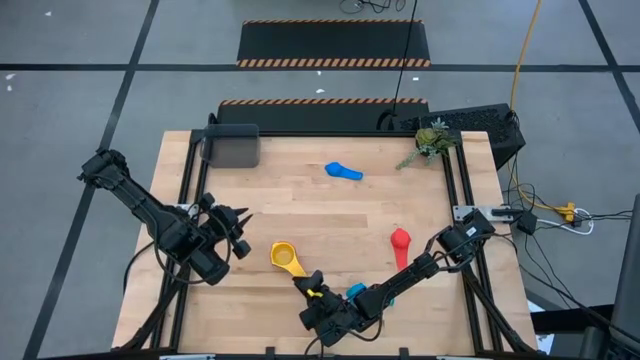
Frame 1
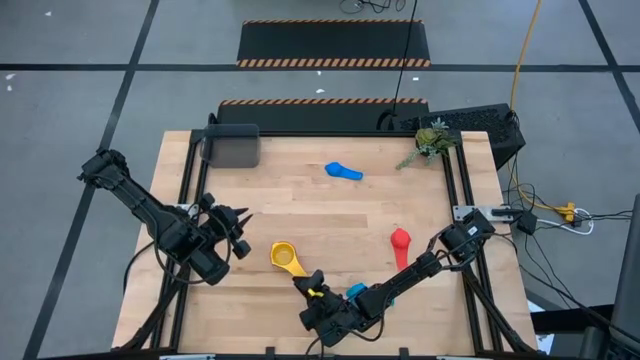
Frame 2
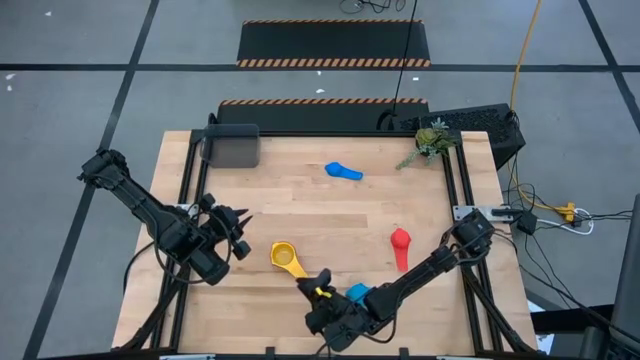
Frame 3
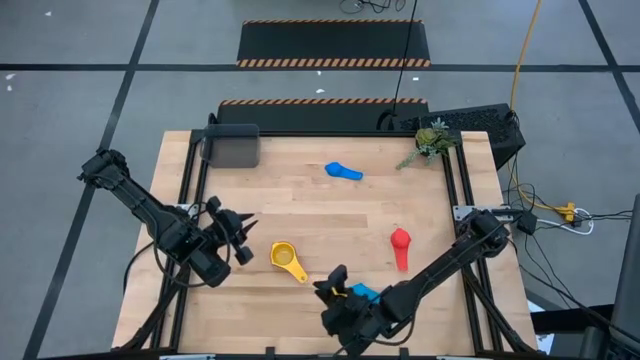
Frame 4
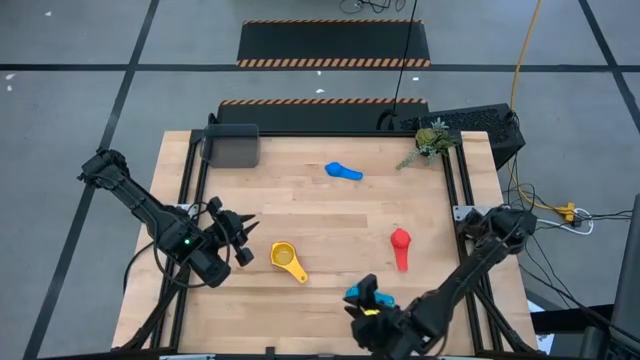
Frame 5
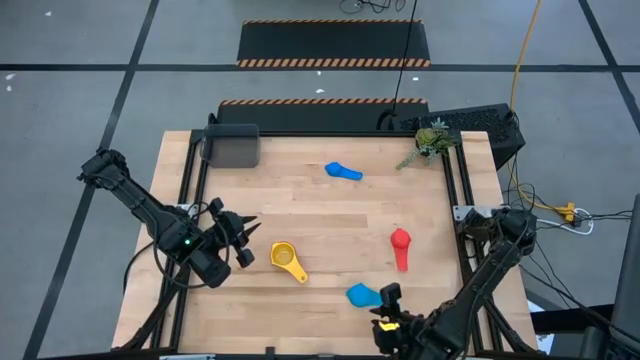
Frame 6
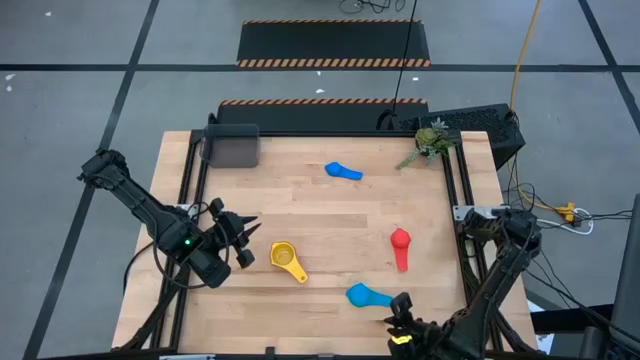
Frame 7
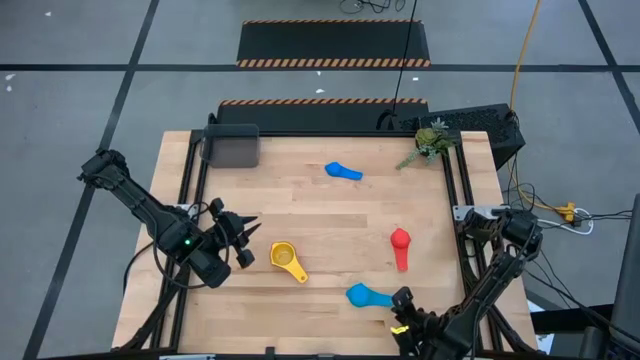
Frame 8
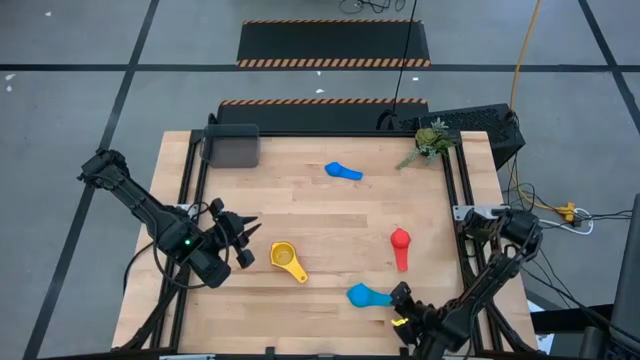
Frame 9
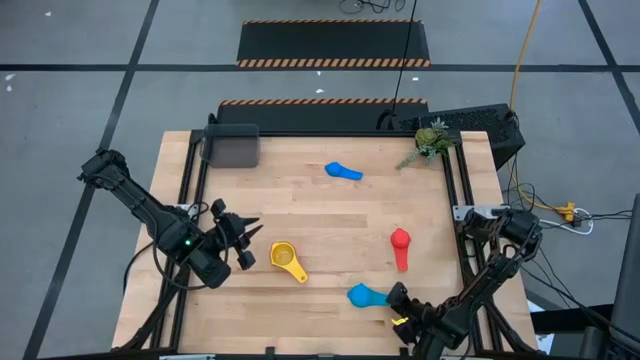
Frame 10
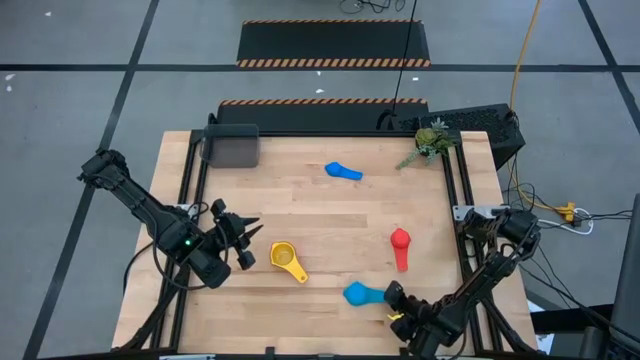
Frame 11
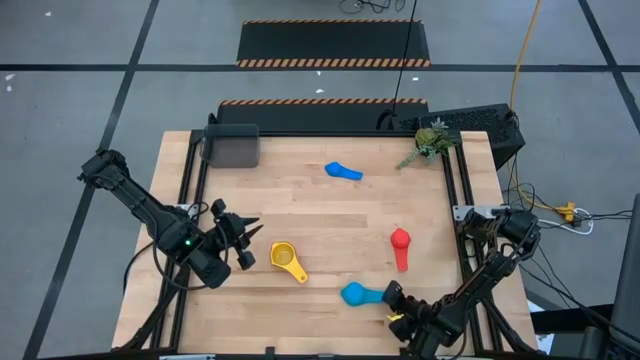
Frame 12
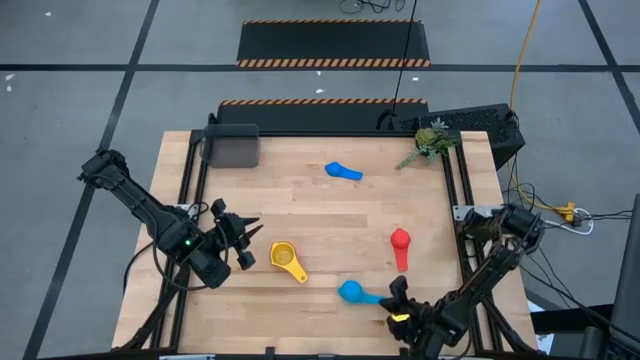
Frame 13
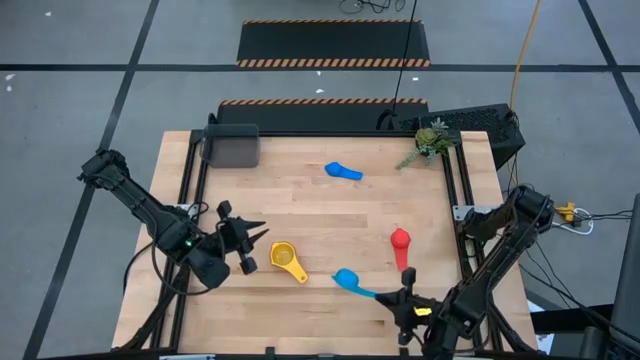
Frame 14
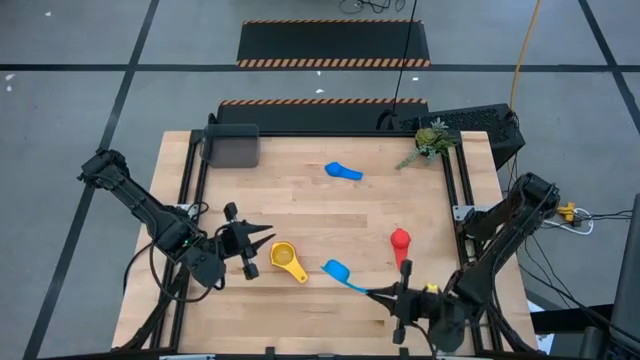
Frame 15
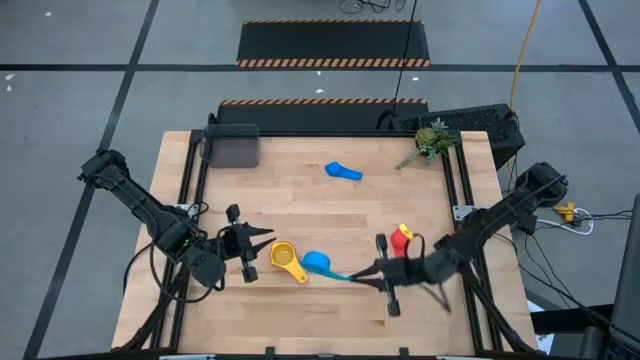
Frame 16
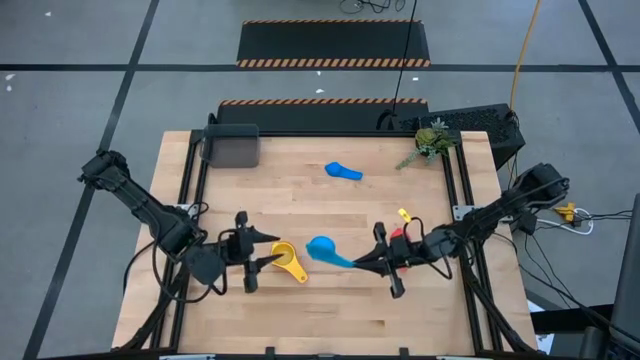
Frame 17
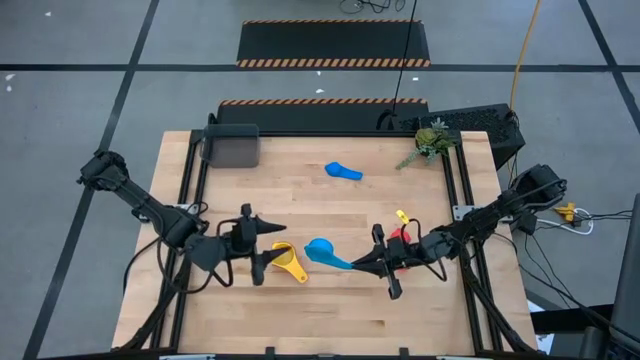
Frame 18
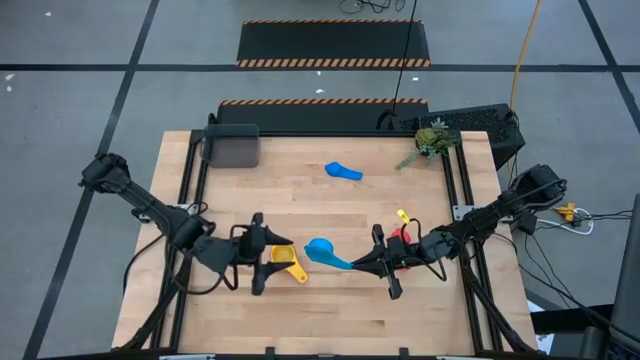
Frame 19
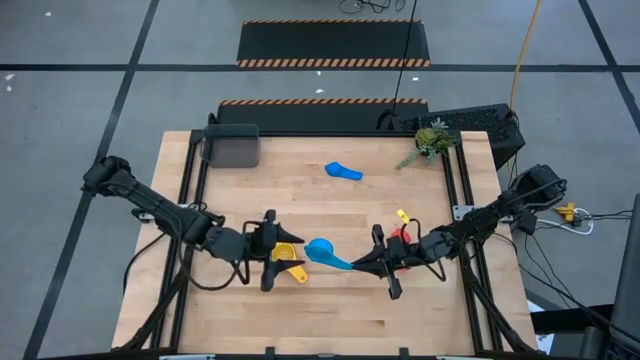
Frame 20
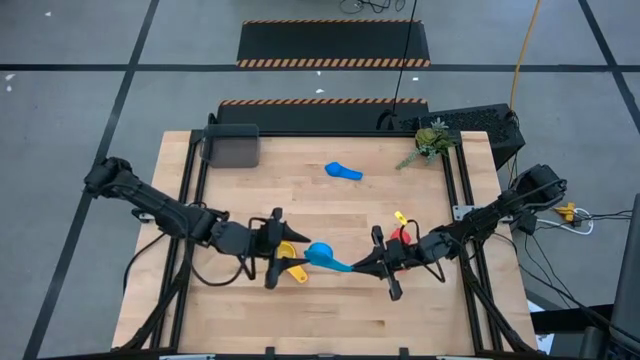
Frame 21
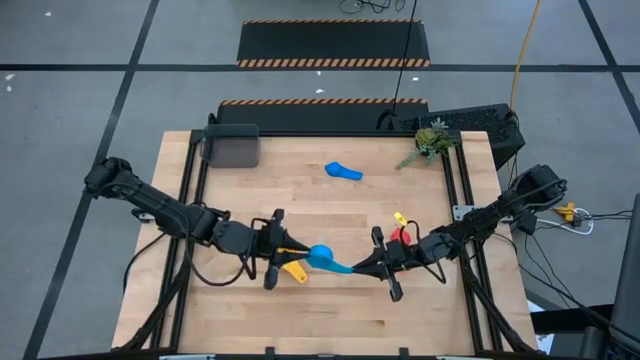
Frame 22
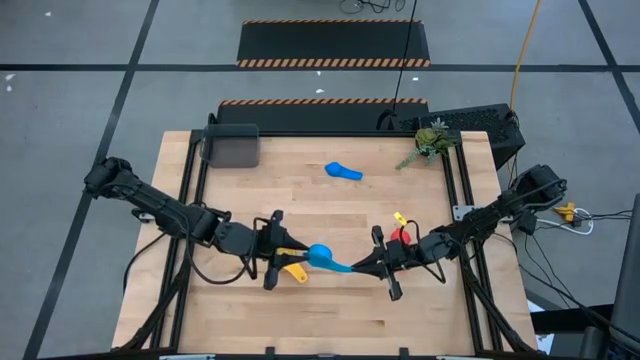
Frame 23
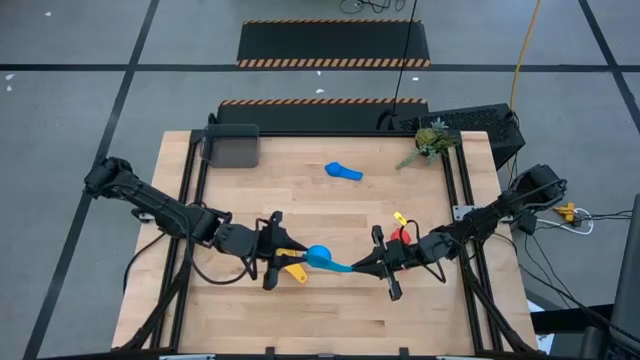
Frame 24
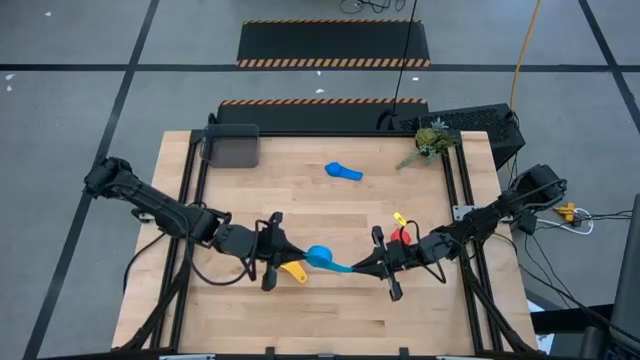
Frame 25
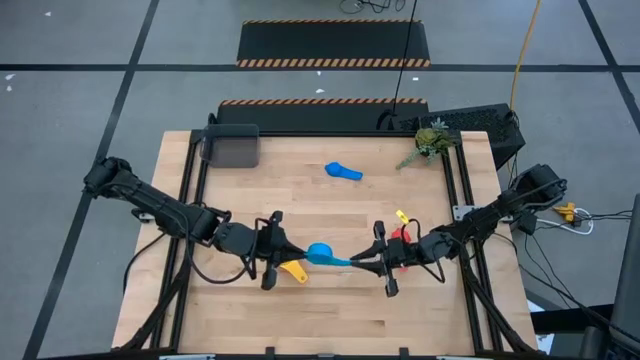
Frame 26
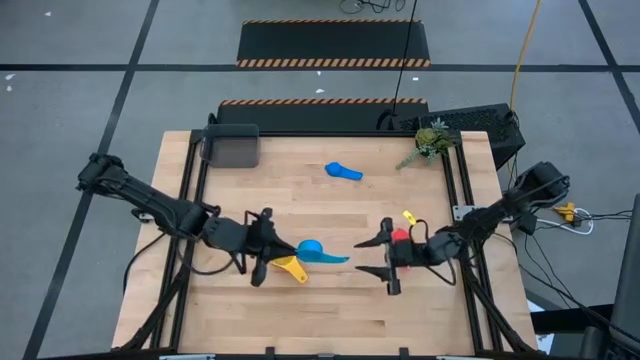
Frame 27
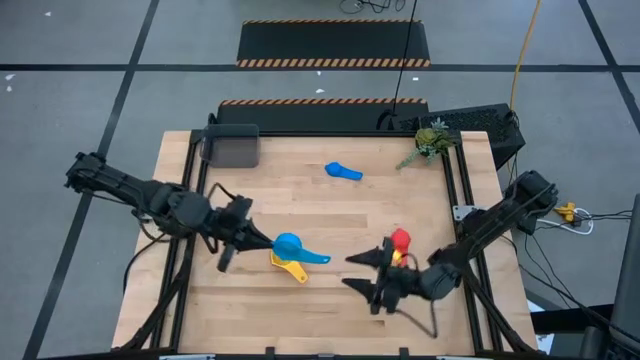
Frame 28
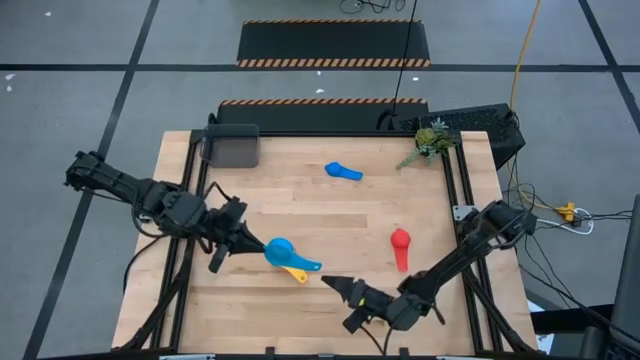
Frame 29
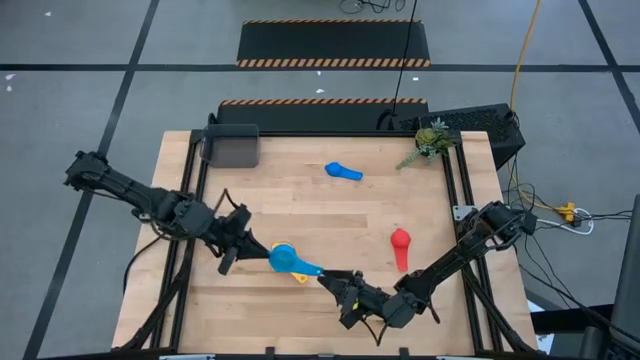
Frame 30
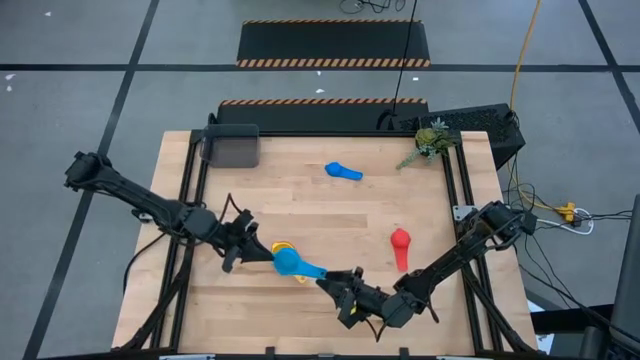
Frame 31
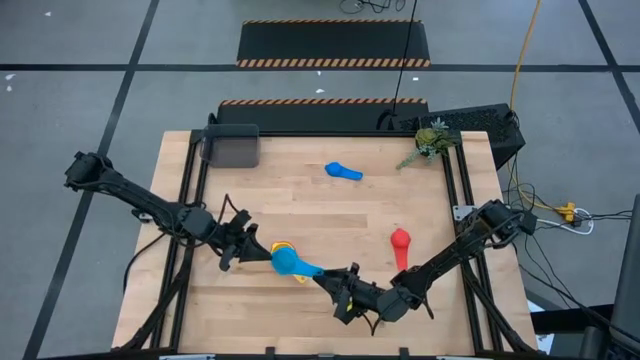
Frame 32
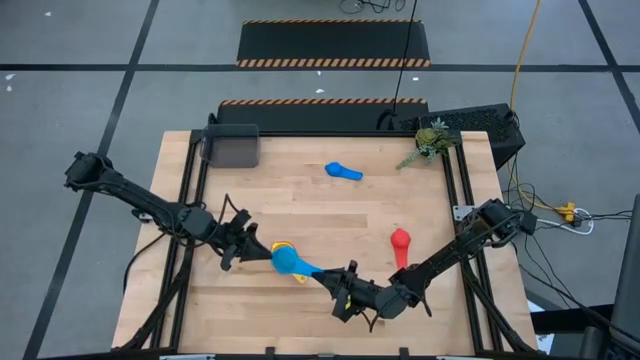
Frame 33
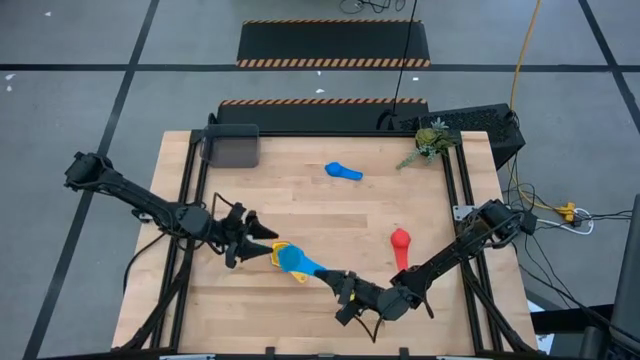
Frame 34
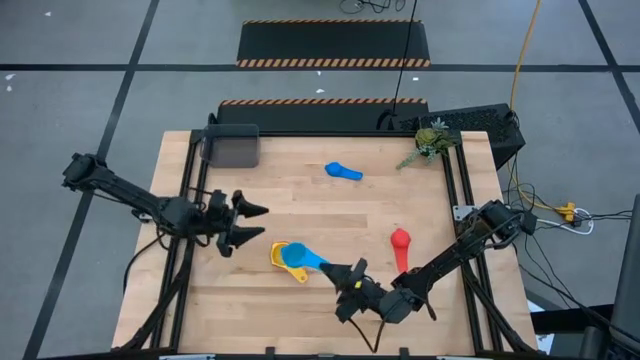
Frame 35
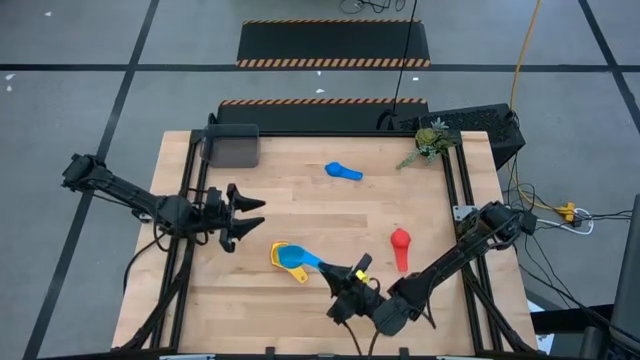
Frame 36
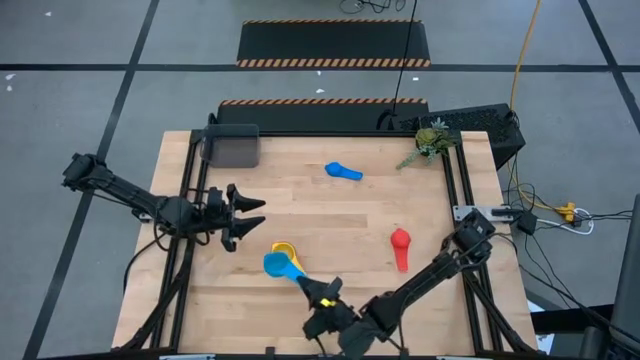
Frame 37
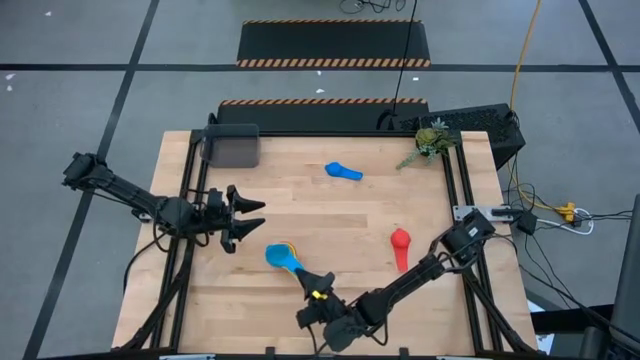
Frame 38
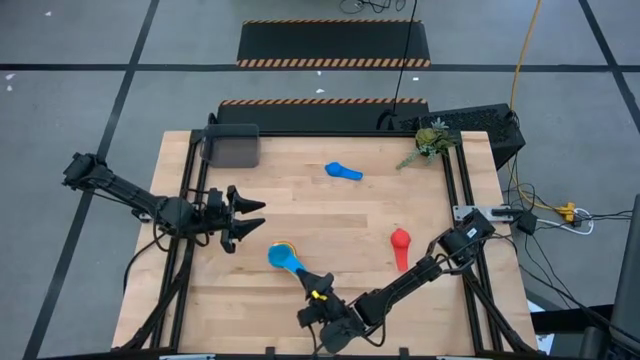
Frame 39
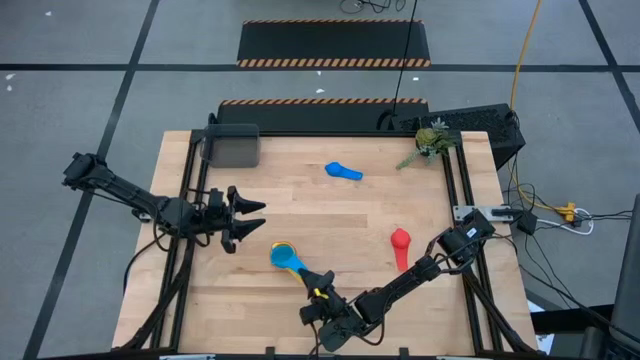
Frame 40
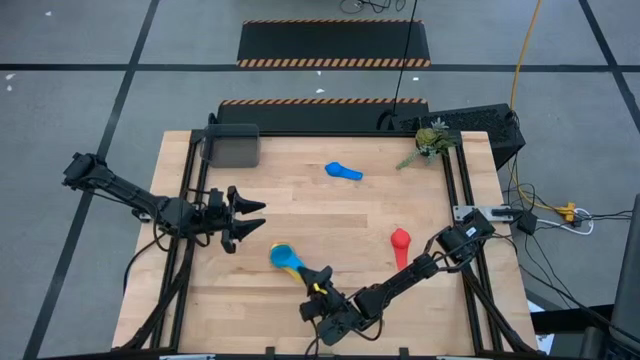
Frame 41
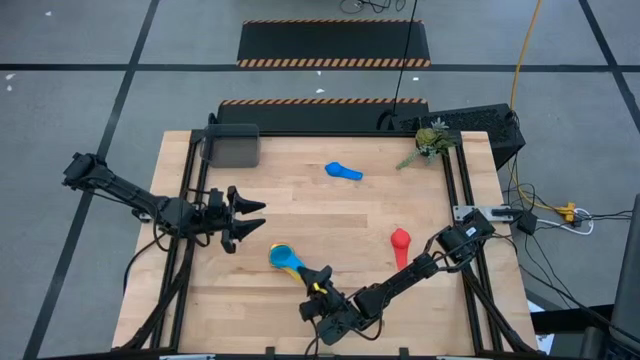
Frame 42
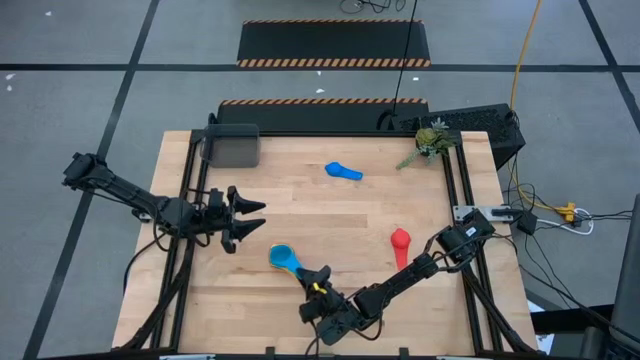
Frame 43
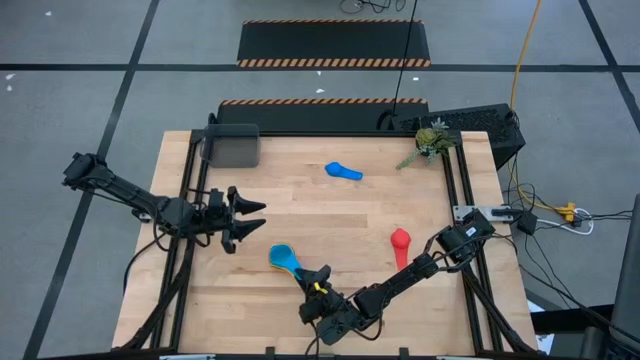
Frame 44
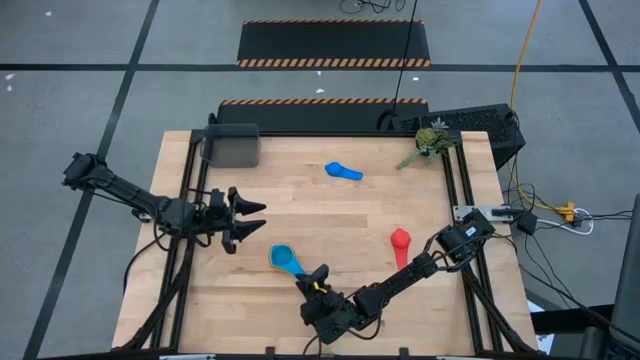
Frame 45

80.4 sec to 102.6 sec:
Task: Nest measuring cups in basket
Stack the light blue measuring cup on top of the yellow measuring cup
